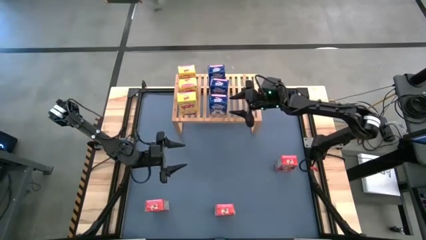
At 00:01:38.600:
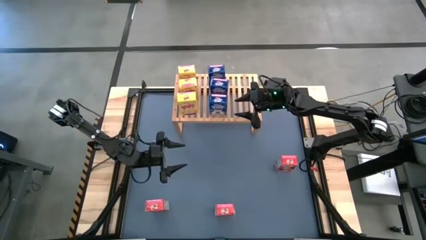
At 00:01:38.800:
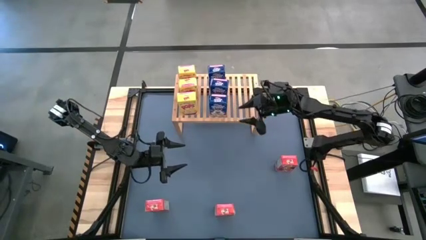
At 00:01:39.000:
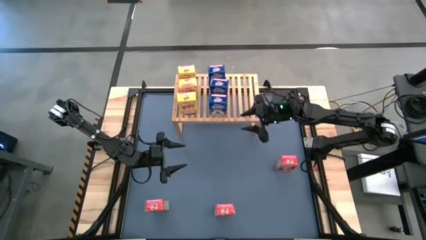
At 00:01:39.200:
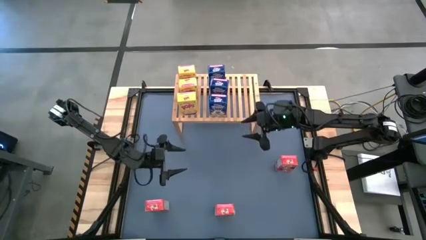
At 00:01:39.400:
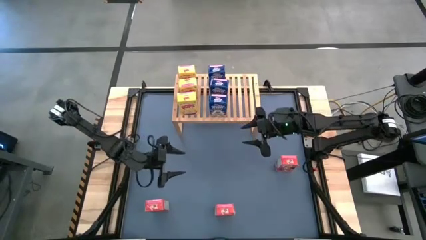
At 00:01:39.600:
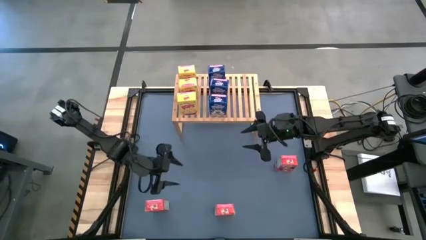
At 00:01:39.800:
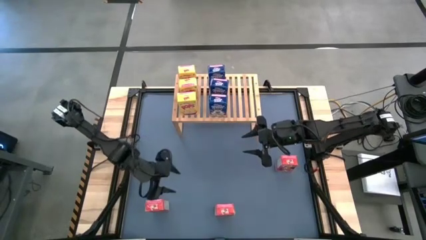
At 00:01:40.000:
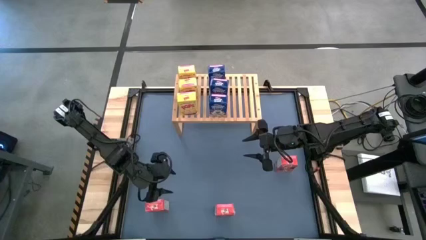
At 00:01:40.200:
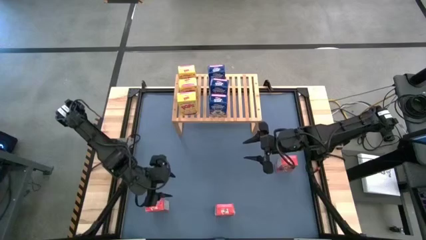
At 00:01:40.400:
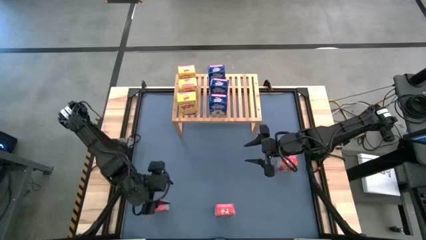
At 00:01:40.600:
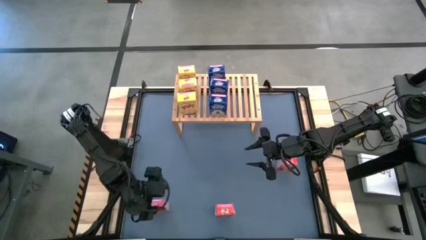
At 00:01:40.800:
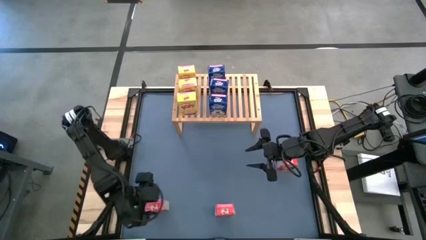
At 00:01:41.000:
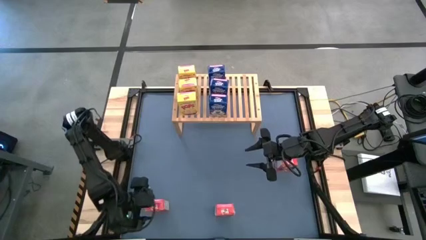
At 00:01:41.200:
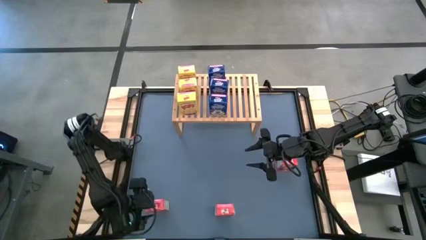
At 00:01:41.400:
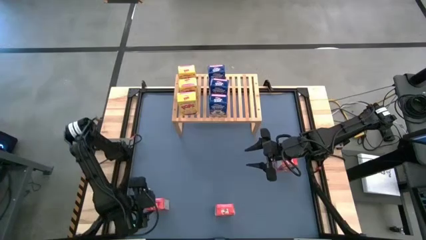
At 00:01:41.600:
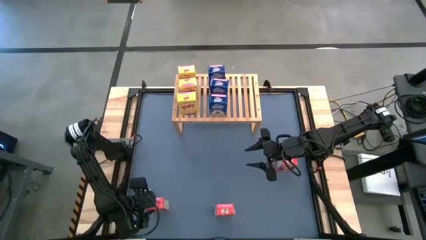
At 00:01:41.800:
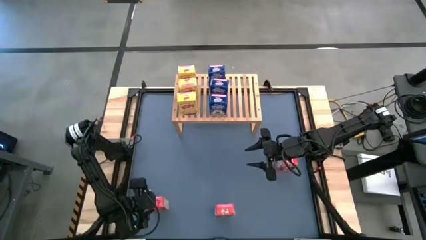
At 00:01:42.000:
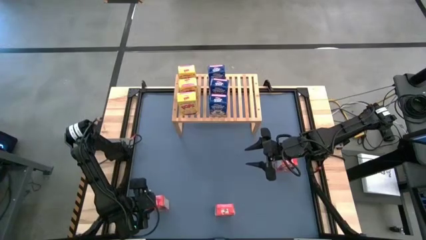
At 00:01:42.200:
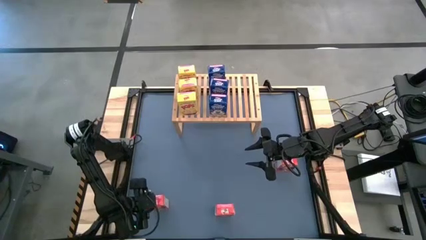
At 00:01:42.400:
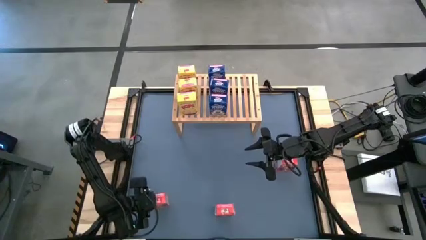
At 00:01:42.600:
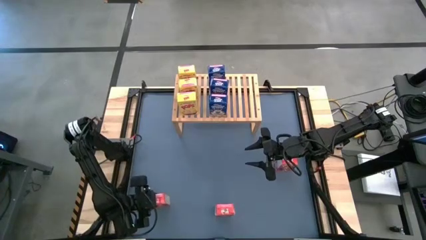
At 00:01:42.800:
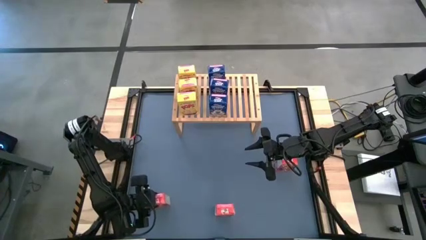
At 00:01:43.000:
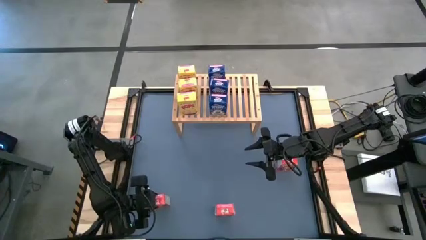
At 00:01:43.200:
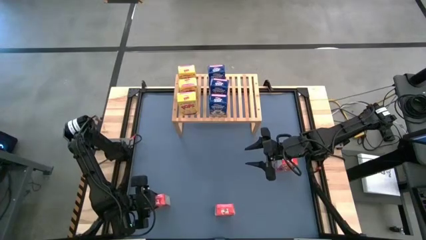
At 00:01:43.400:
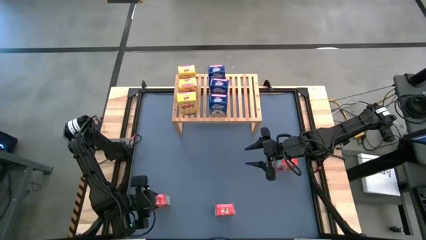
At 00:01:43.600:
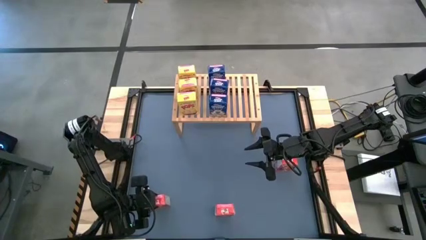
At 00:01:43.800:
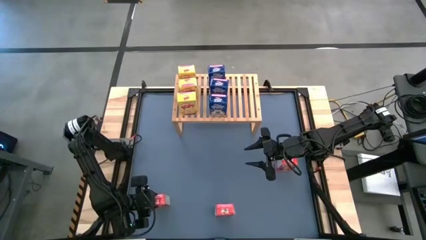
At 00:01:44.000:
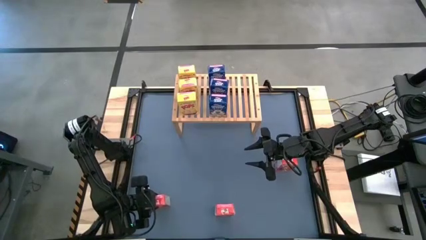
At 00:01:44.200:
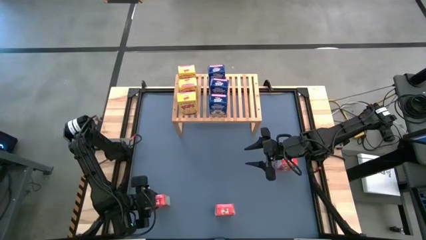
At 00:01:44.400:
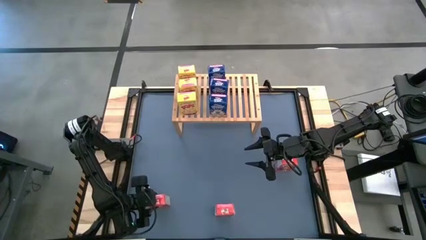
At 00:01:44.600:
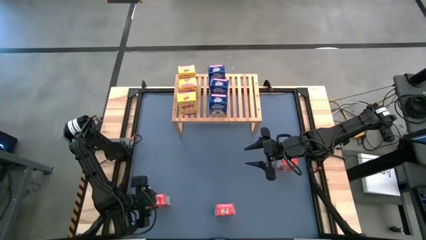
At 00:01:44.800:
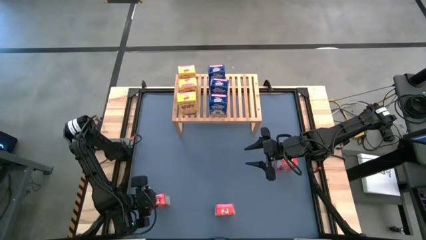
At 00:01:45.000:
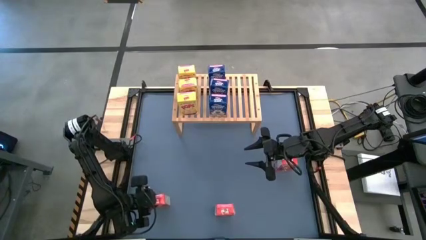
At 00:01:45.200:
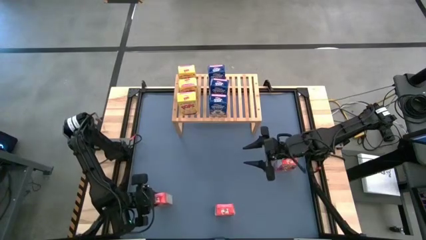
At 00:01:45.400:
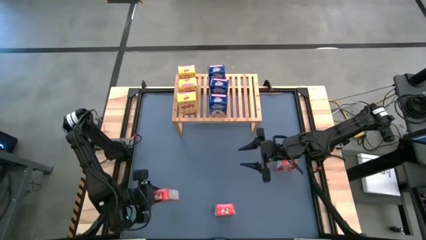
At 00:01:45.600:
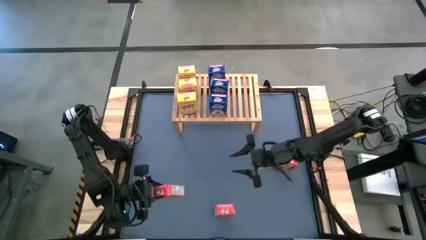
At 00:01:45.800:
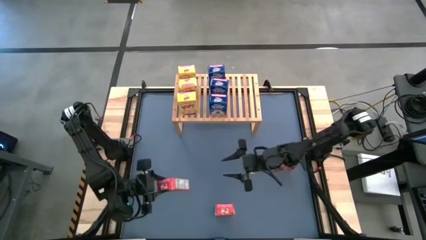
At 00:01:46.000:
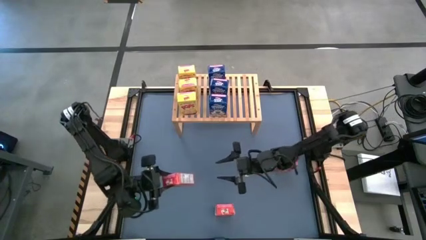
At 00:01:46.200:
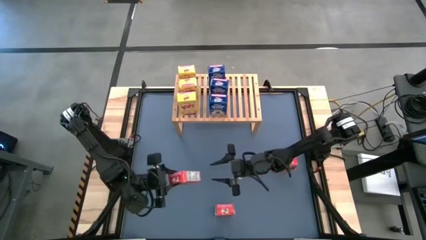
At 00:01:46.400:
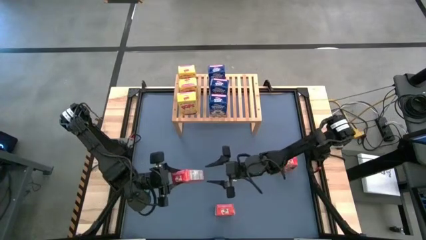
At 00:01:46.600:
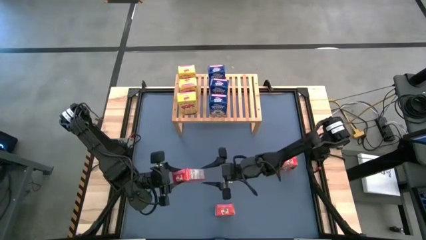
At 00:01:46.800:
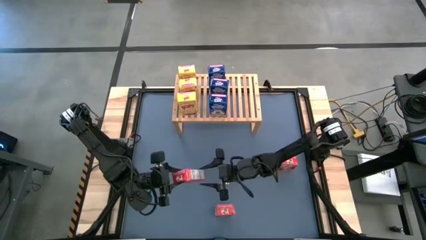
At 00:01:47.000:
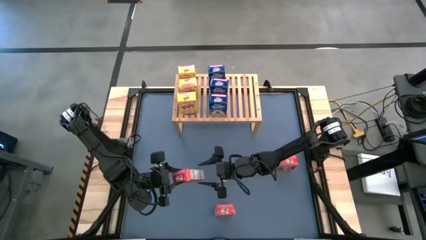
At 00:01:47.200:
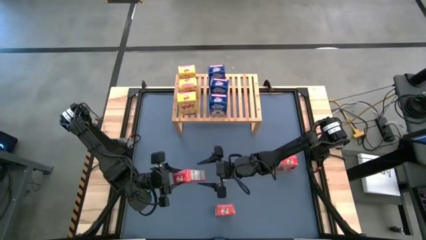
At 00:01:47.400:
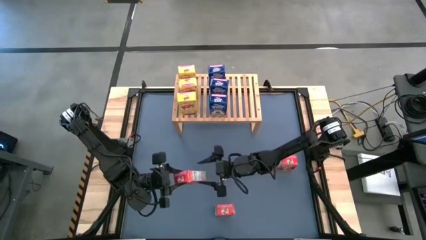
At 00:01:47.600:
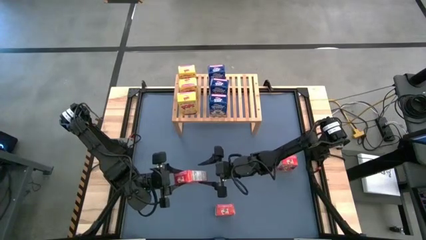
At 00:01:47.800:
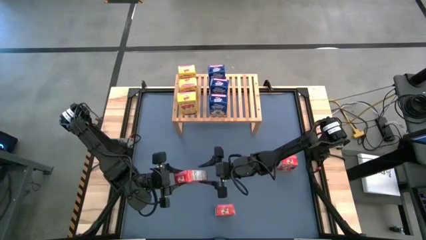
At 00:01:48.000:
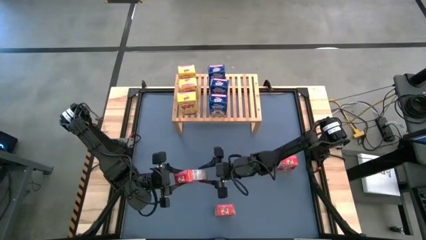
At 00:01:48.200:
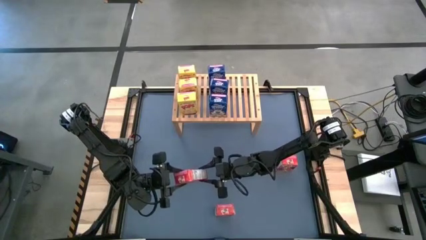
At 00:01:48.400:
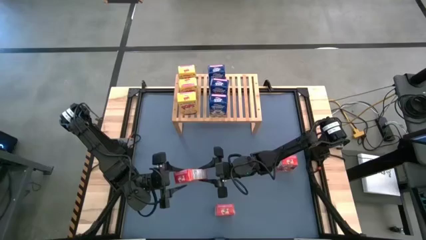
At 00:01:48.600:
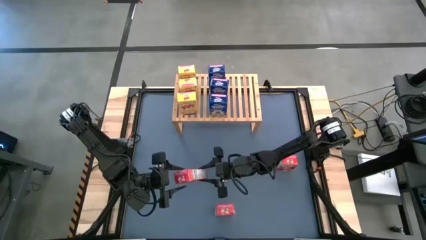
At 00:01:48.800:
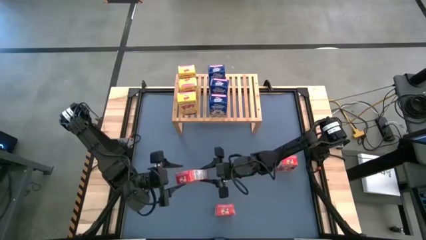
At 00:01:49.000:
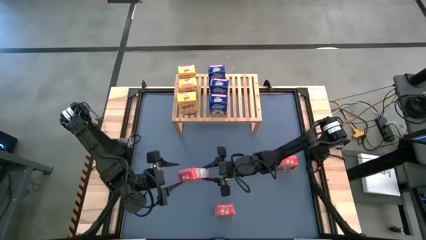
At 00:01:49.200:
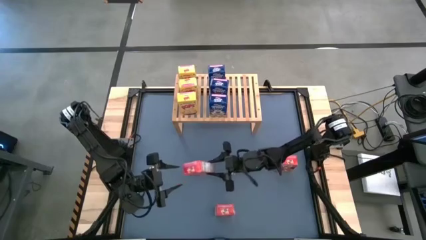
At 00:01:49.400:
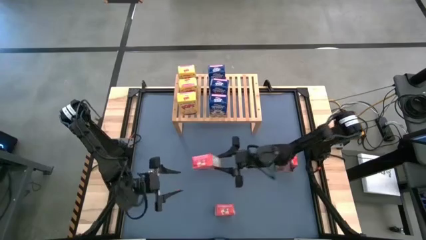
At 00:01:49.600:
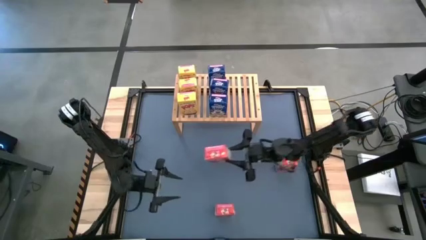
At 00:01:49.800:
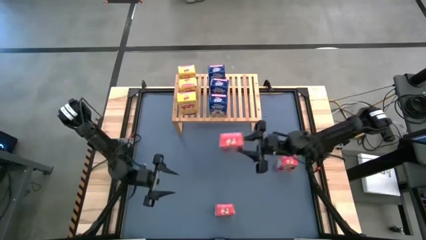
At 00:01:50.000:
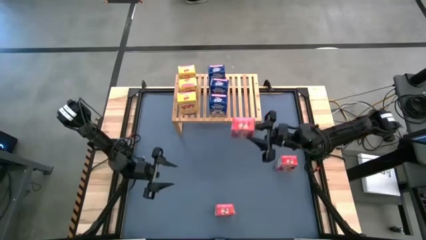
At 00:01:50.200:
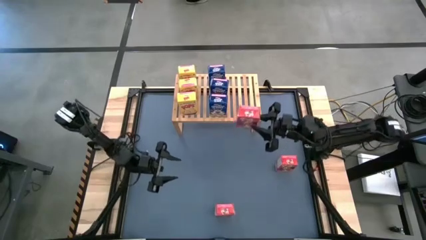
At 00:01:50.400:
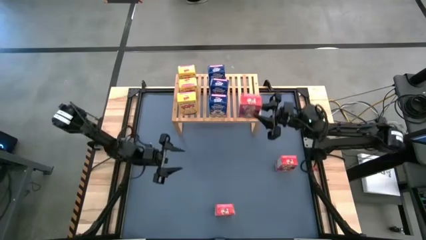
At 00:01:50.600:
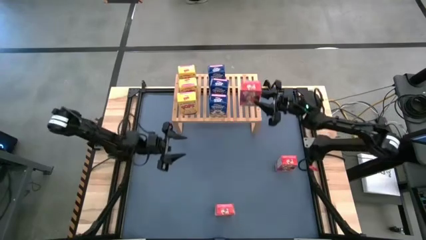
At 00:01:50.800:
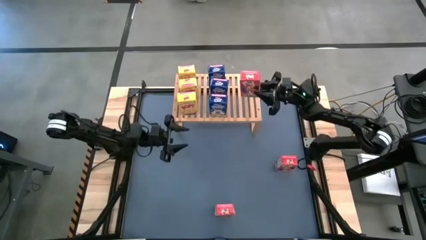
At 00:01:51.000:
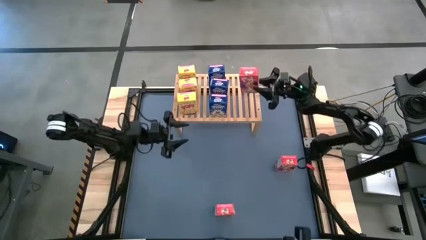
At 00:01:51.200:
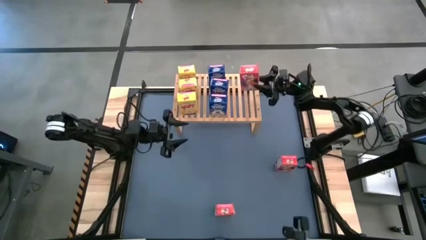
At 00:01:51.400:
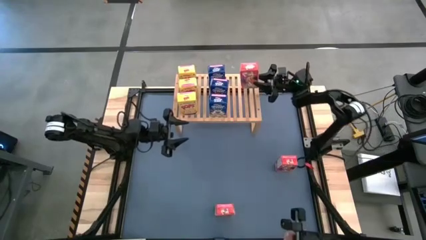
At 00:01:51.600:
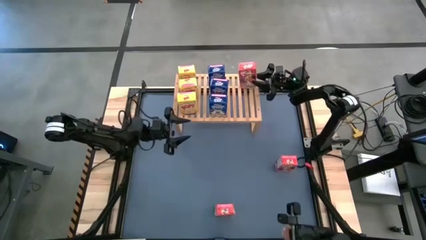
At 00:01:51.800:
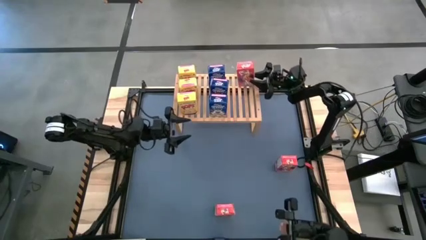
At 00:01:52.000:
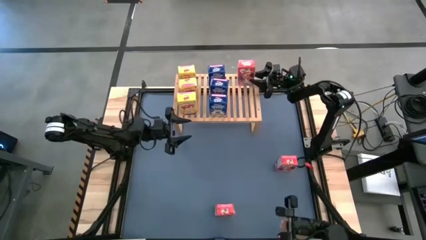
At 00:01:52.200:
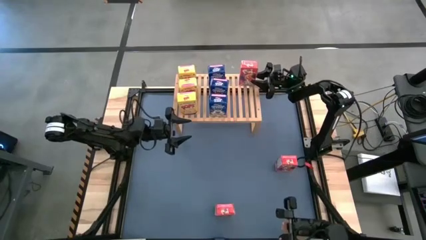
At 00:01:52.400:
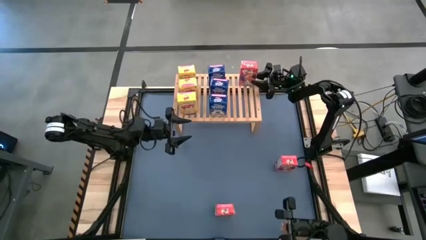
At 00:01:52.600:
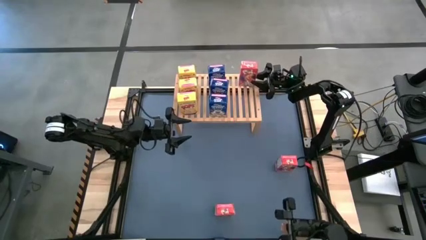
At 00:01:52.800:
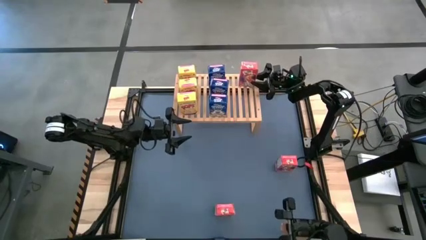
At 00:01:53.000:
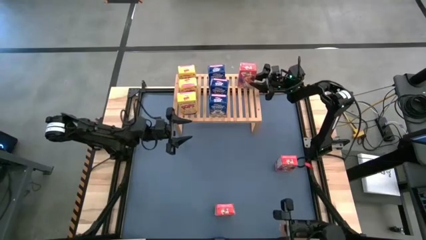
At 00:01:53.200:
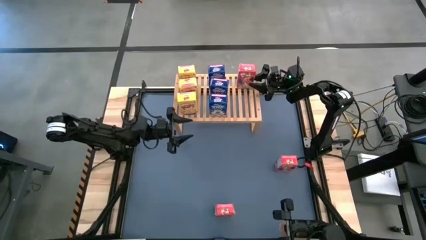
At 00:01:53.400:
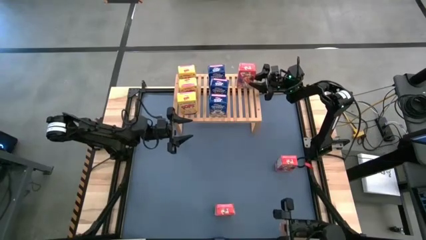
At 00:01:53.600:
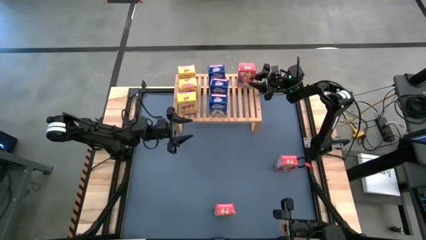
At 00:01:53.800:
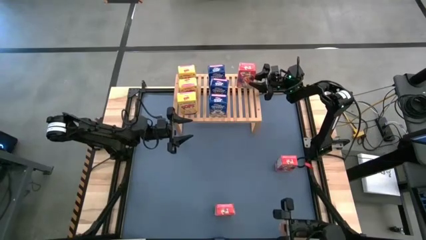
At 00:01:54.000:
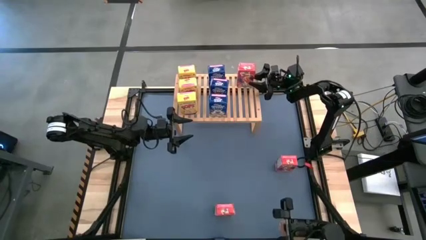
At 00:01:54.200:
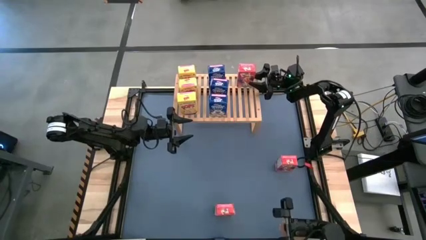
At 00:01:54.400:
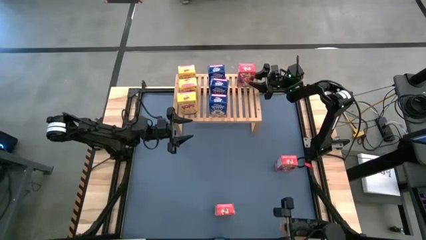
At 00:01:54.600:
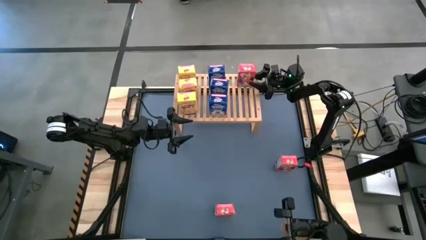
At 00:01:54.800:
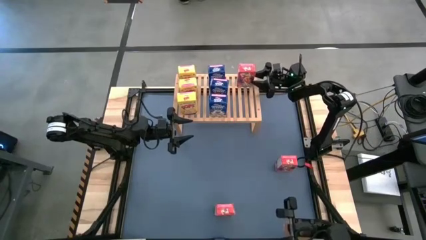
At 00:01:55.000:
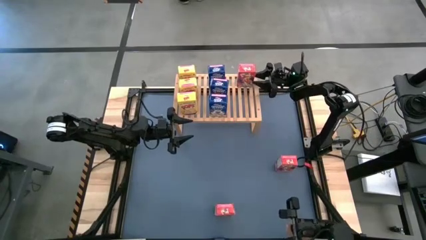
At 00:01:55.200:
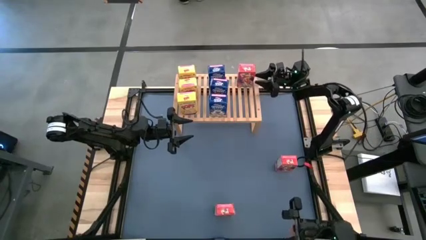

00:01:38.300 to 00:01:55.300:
Task: Stack cereal on shelf
Put the bottom left red cereal box on the shelf
